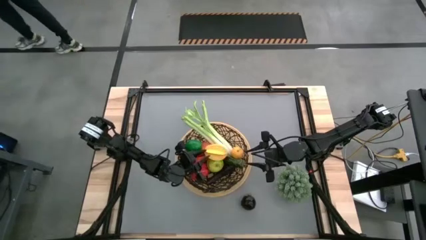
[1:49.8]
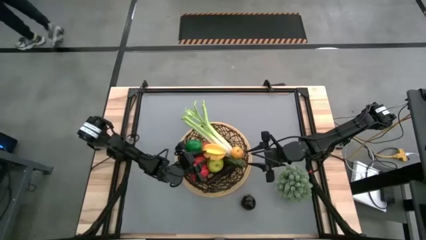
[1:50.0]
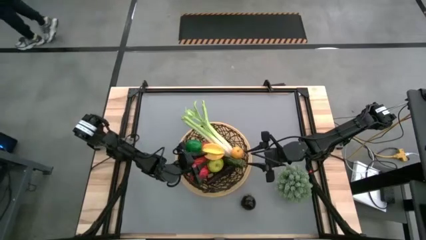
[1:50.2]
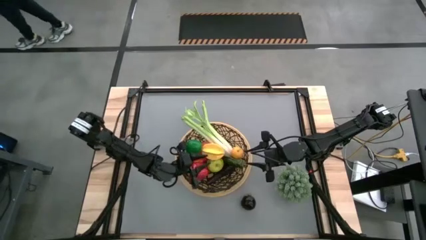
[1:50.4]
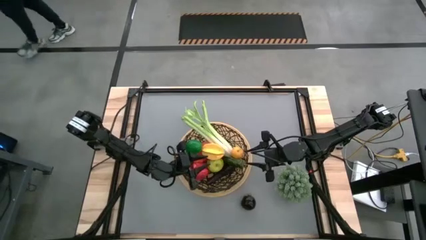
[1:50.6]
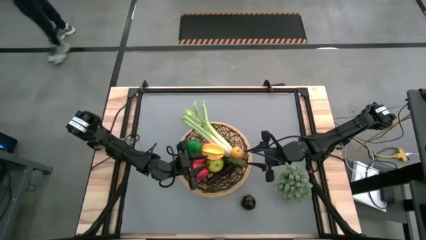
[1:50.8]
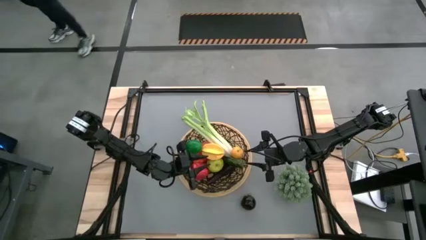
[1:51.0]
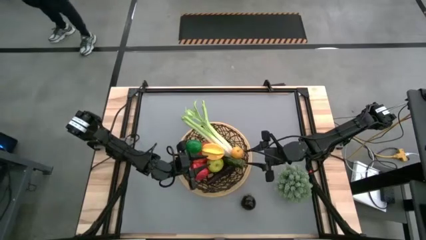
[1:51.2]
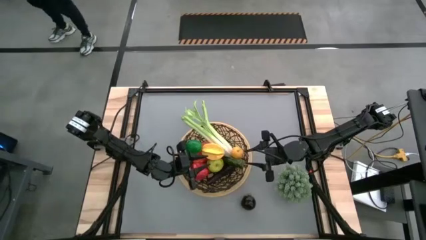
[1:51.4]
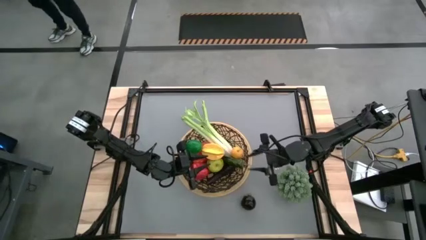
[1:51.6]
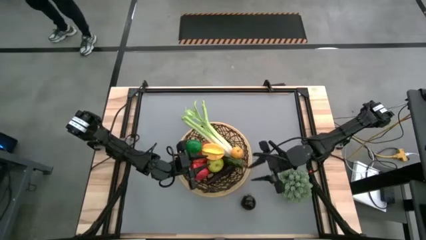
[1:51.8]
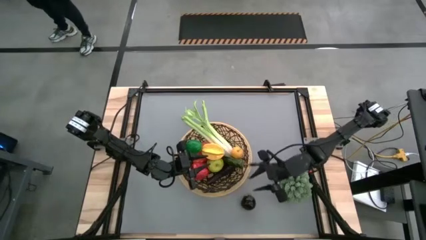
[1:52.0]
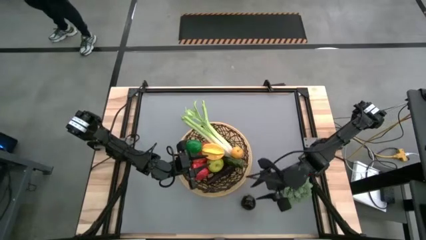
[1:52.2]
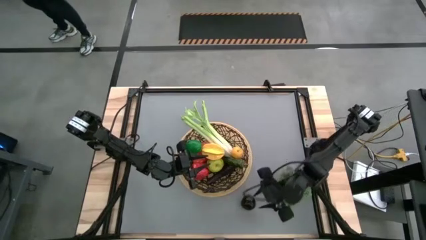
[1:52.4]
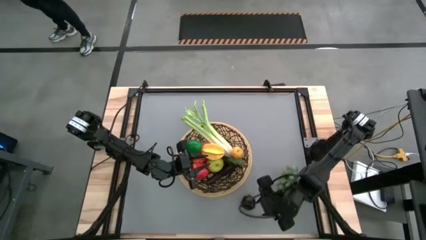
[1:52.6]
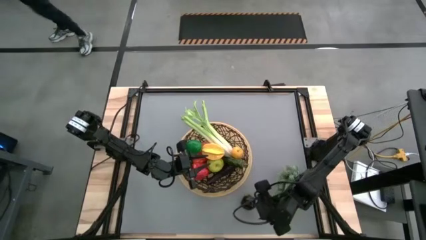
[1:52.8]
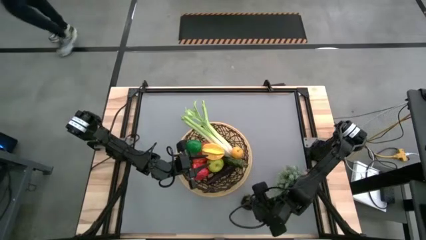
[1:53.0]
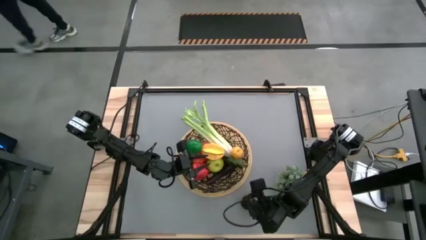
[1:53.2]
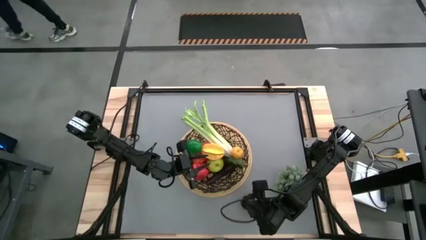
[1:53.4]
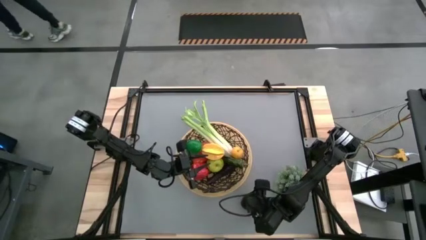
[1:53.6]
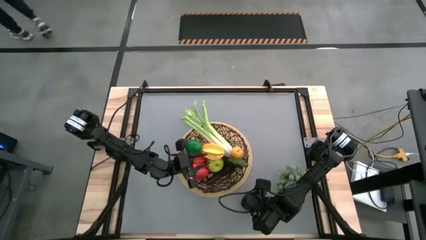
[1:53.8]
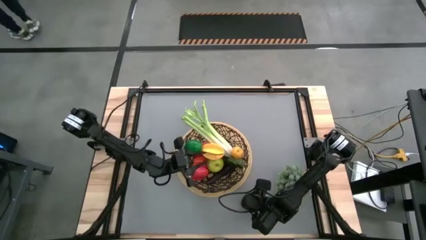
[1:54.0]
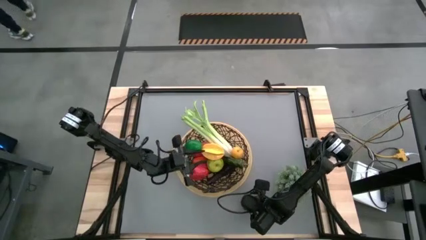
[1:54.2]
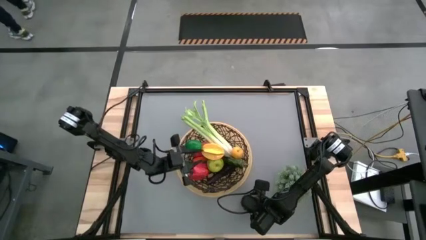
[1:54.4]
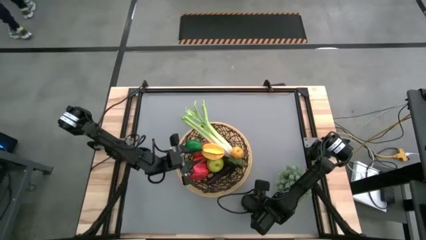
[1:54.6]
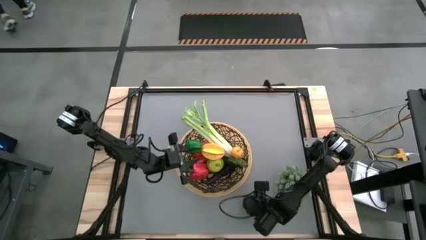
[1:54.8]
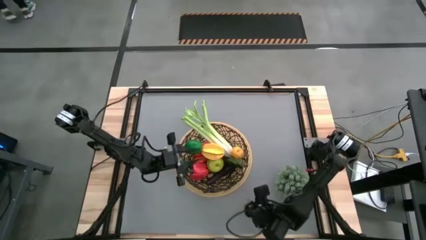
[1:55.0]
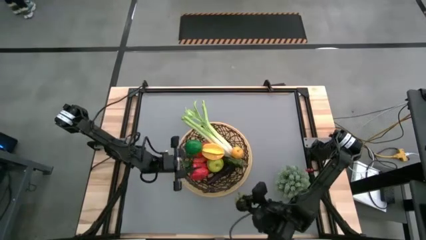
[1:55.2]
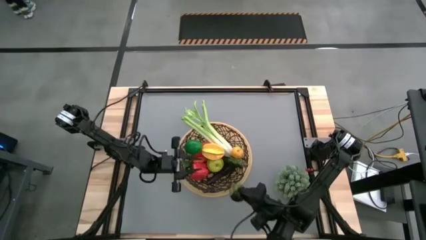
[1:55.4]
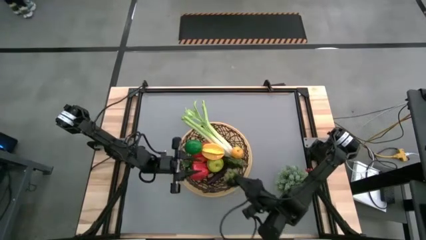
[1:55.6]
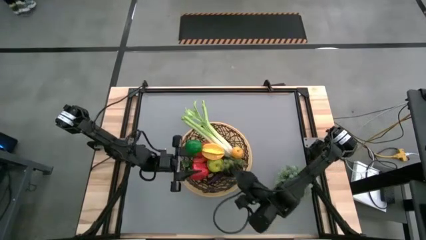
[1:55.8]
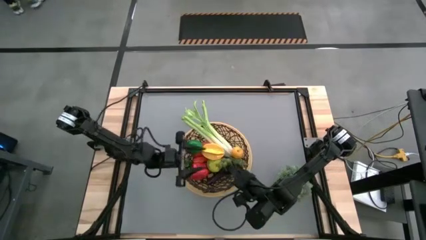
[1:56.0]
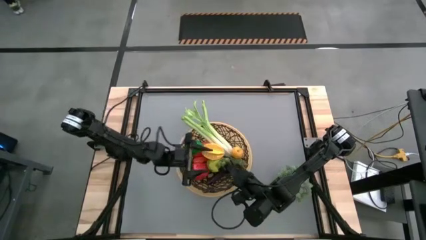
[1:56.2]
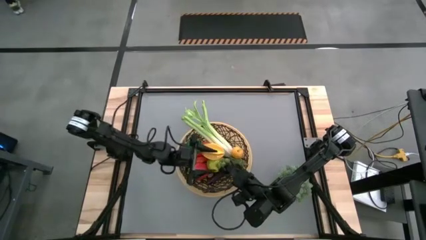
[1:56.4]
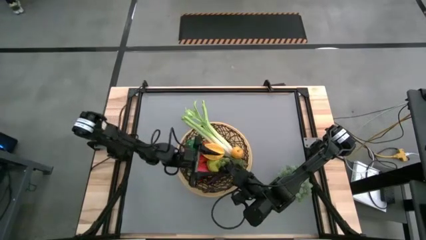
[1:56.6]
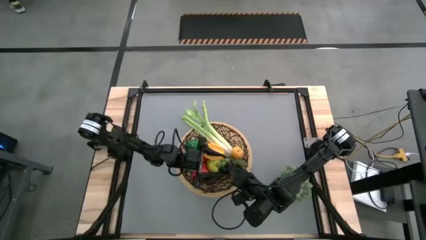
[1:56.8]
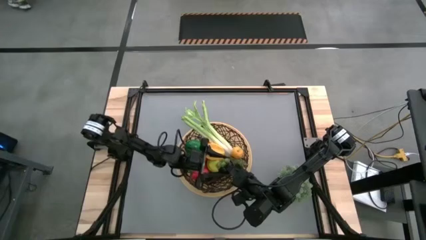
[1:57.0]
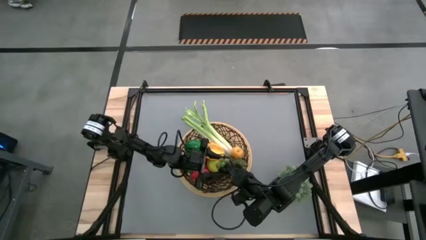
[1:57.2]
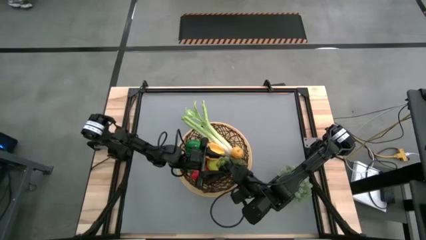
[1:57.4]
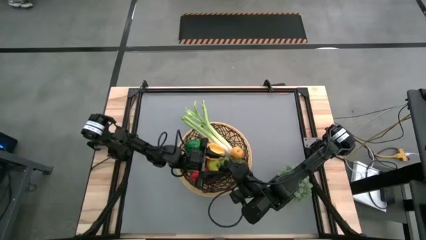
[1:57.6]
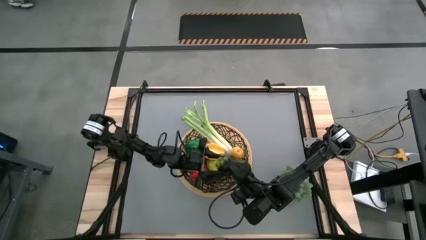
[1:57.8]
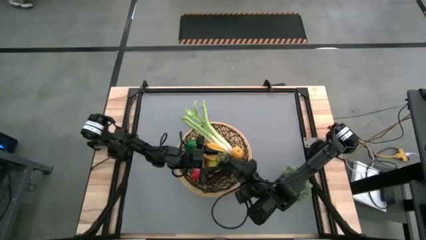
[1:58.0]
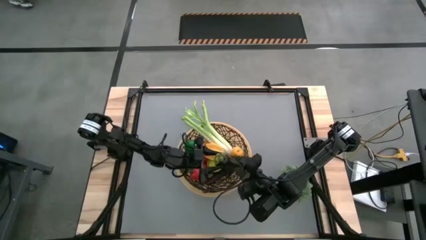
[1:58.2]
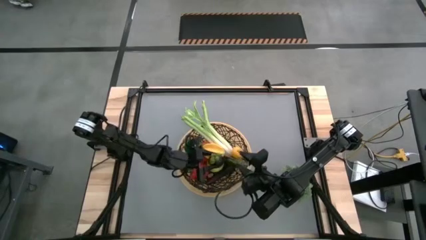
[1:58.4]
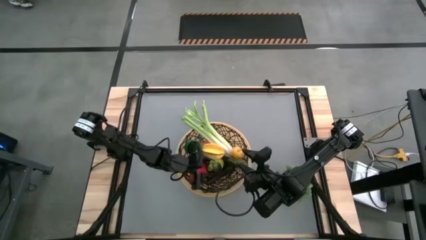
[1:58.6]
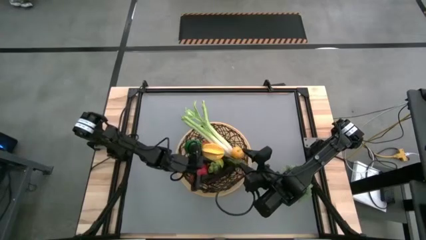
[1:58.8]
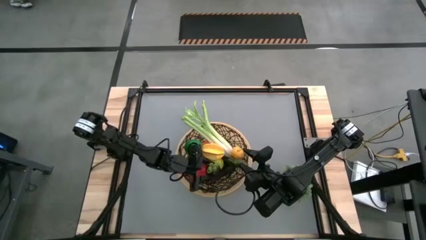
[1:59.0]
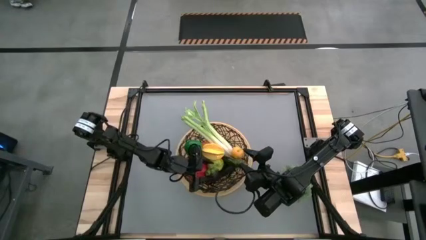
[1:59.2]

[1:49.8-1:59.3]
Task: Build produce basket
Put the mangosteen into the wire basket

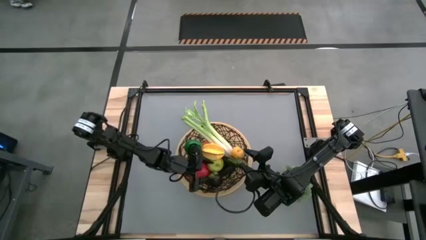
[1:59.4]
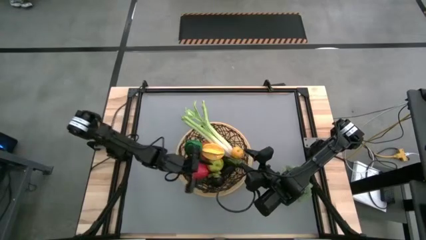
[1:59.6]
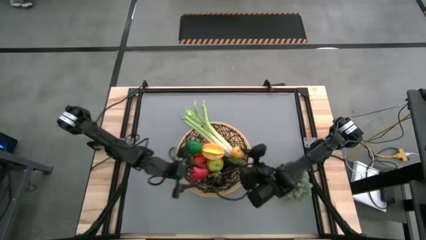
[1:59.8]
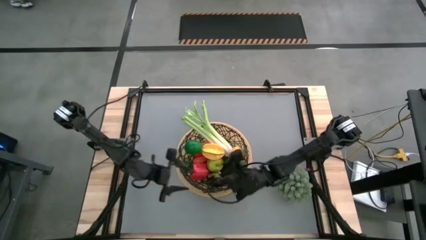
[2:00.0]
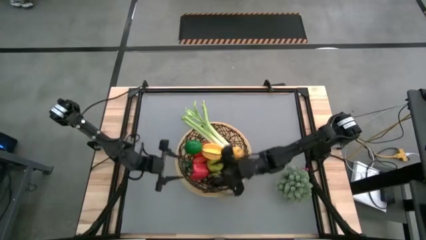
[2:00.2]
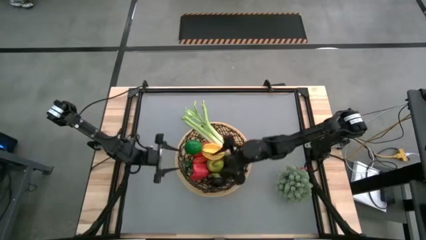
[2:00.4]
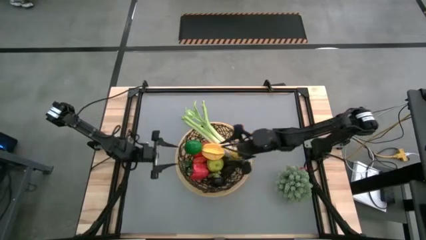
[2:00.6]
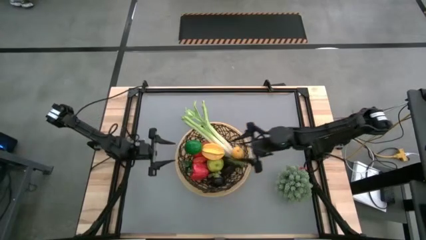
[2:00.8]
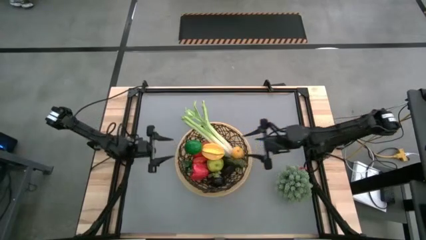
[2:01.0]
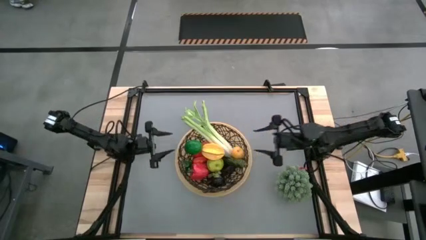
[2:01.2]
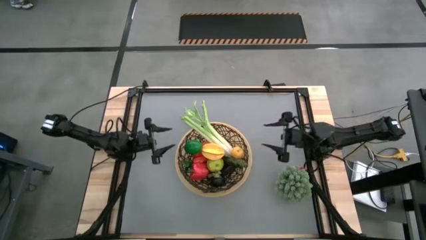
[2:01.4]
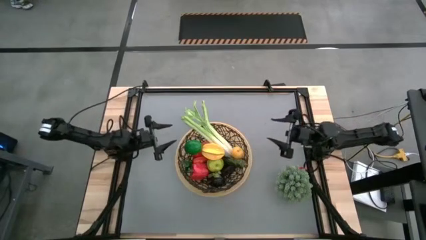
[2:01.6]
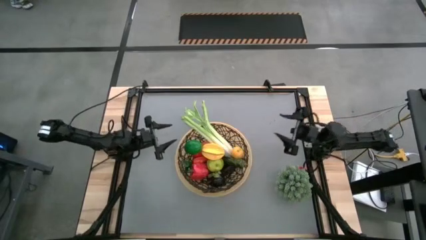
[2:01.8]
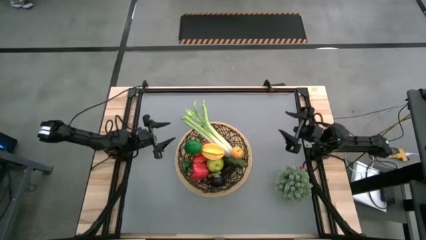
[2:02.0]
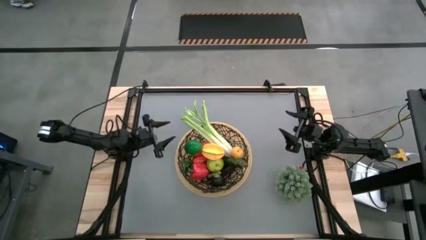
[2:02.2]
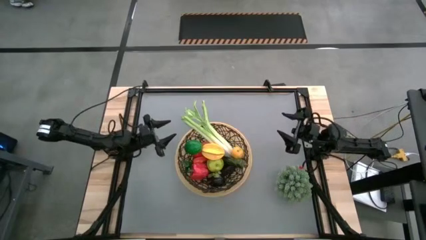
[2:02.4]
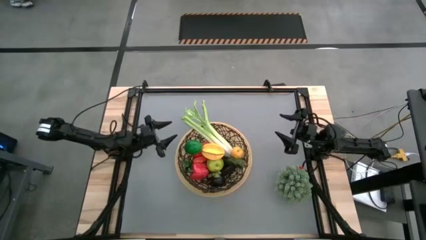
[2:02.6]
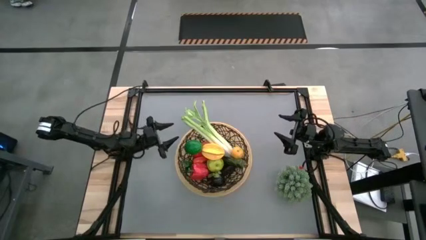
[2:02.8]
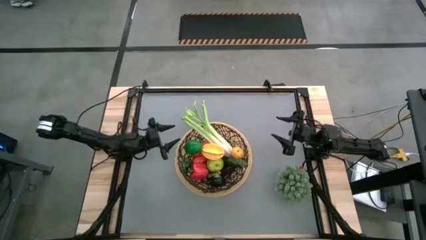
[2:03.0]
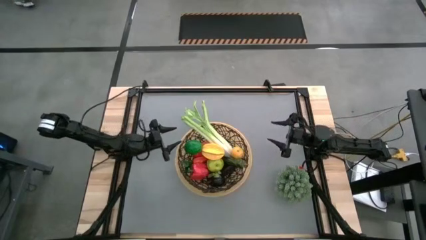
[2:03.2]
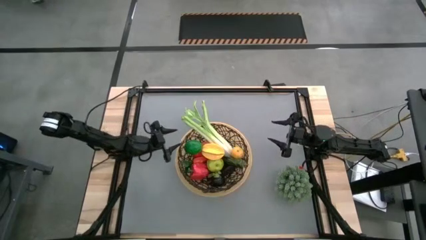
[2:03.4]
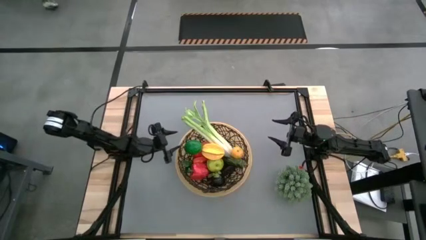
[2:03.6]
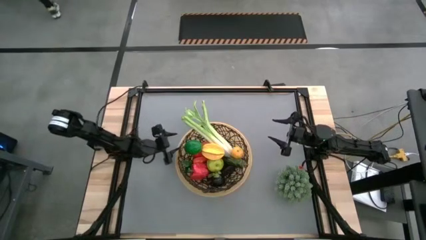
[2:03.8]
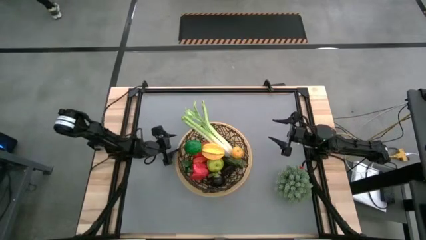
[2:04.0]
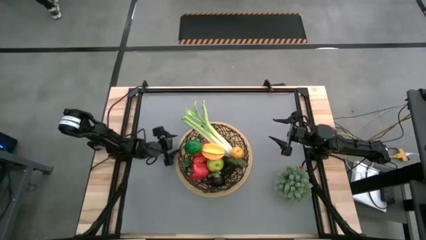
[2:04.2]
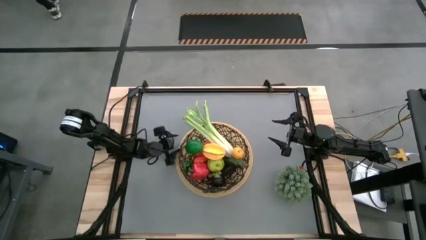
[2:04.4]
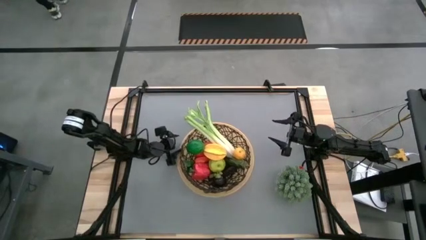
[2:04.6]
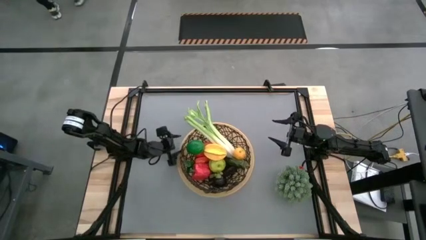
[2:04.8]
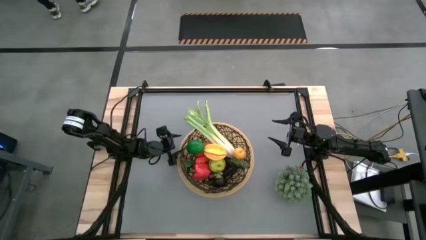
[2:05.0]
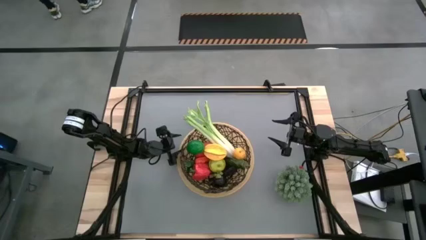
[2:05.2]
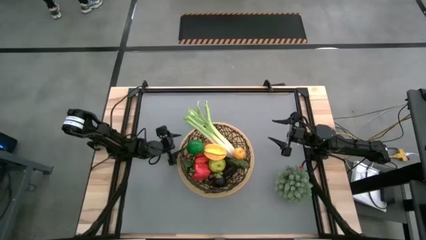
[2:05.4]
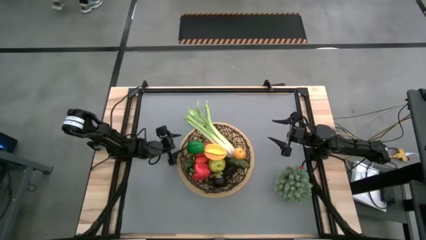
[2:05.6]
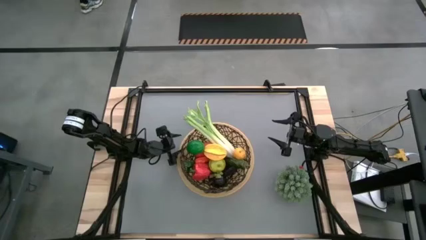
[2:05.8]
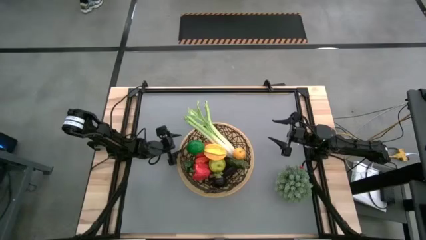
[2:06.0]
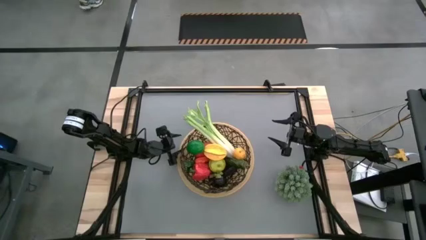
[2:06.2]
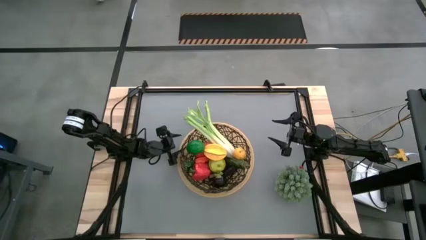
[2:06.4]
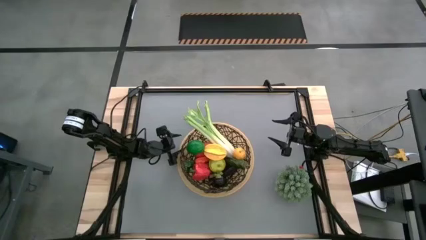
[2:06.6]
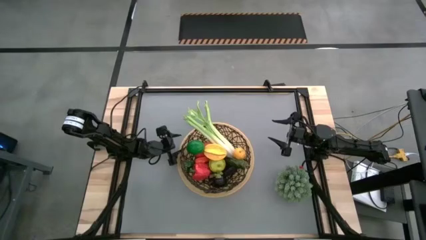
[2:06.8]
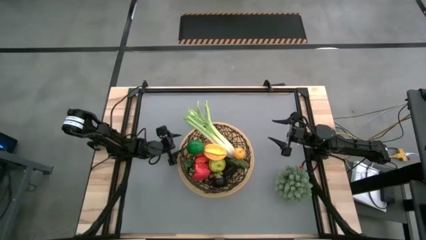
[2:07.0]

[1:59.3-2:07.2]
Return to Home Position
